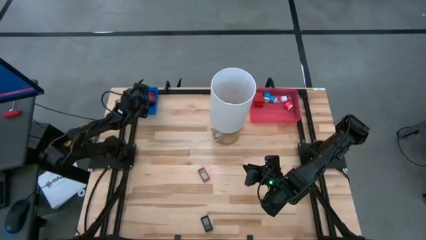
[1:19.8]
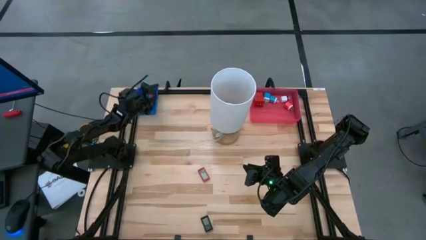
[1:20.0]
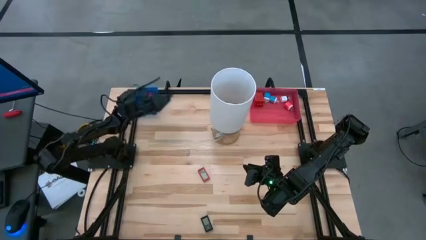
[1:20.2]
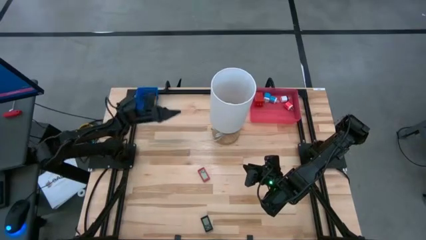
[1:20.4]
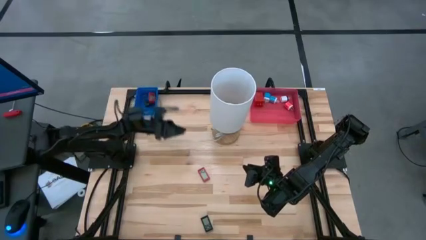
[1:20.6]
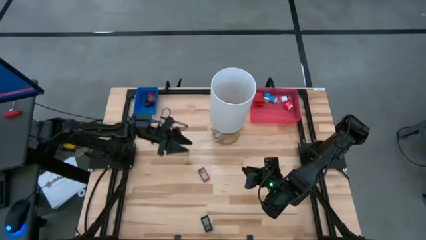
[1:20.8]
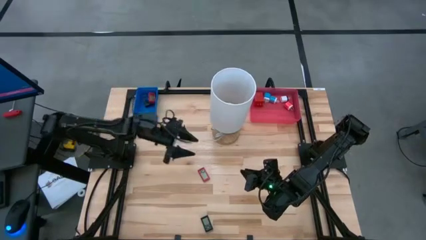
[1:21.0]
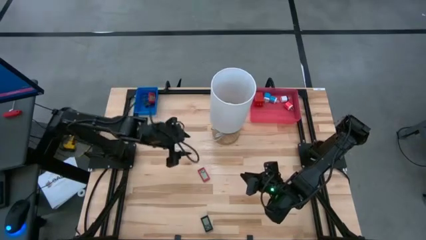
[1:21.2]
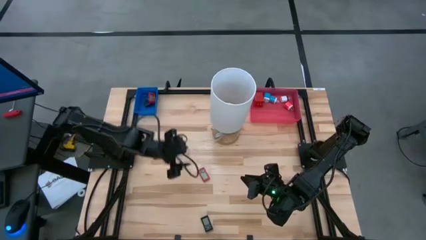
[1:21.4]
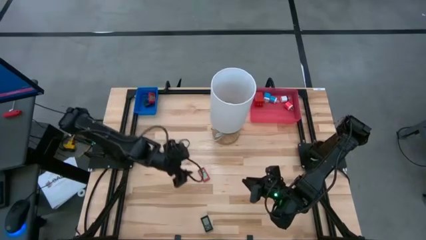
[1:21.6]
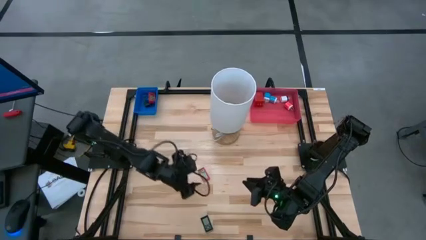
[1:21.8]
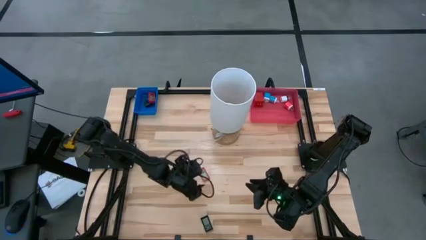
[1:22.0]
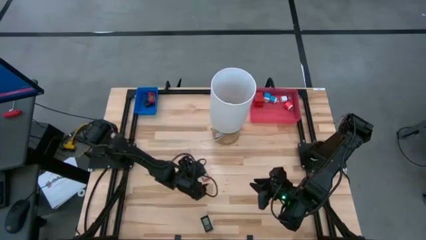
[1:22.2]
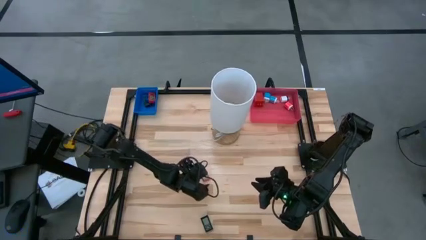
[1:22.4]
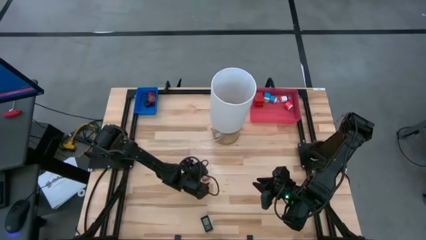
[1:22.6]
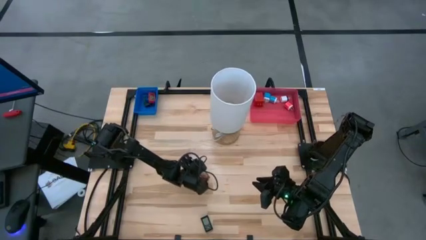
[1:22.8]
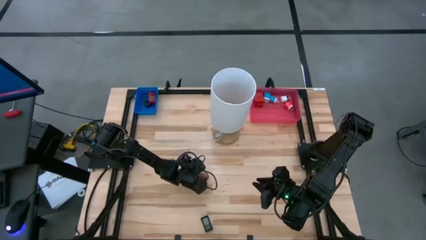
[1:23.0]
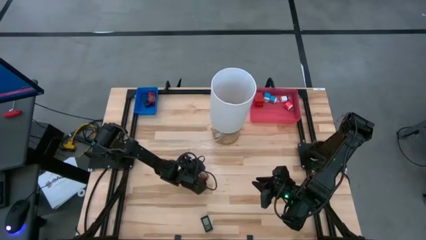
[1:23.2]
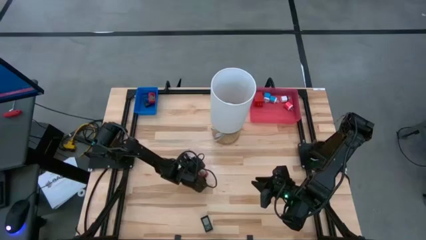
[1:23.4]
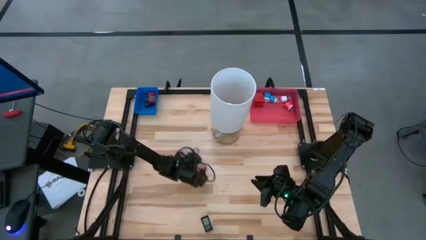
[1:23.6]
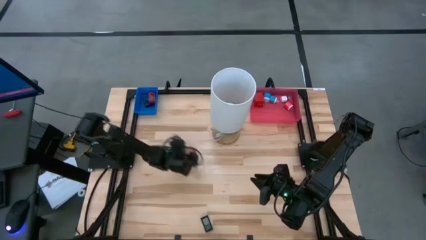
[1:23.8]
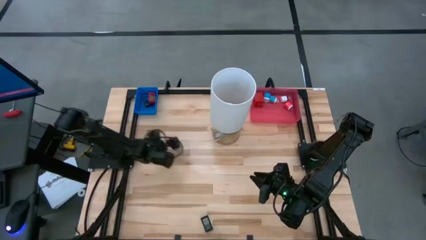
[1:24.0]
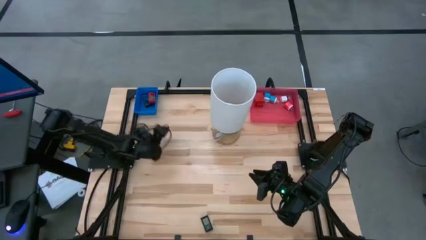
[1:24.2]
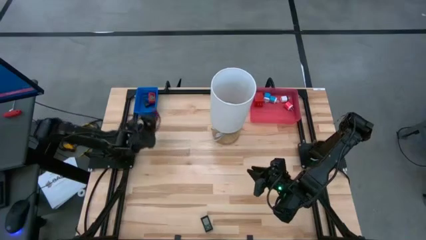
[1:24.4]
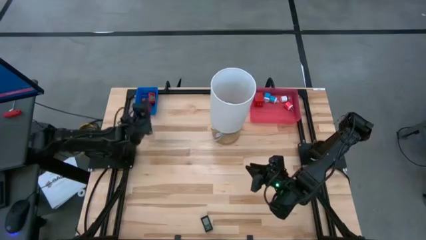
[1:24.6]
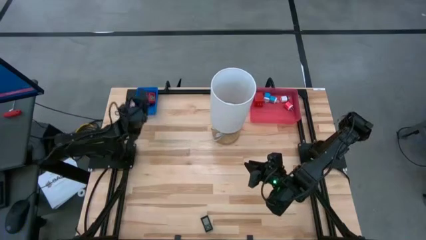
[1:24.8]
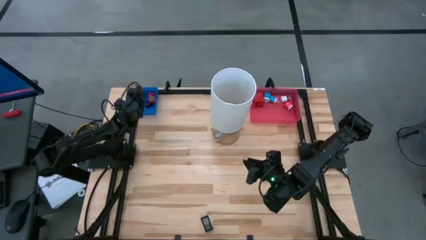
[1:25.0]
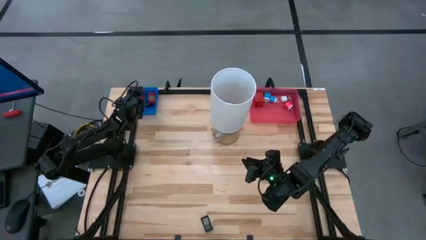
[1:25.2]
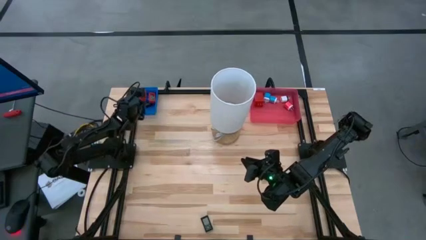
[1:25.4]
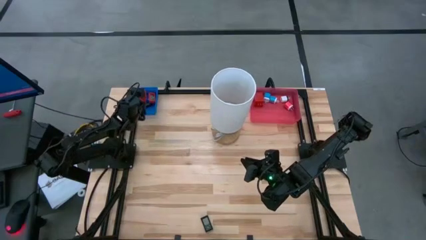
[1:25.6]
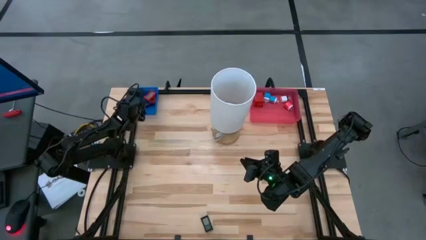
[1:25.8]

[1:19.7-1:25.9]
Task: Pick & Place Office items
Put the red digital timer into the blue bin

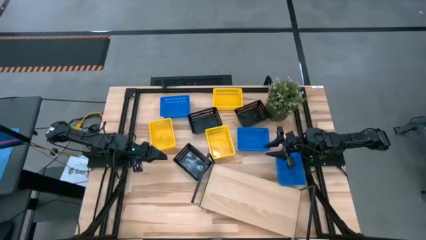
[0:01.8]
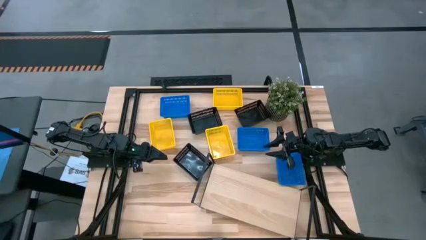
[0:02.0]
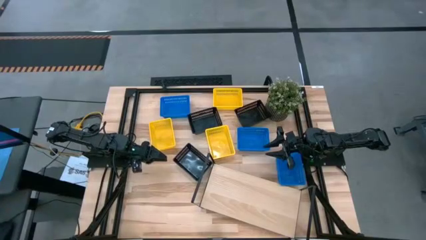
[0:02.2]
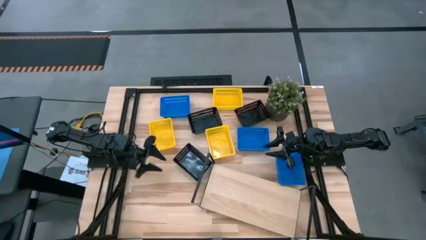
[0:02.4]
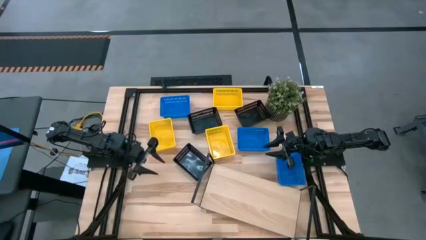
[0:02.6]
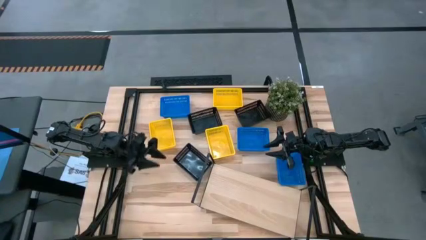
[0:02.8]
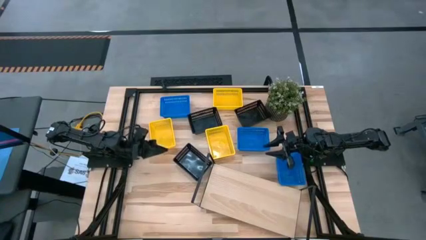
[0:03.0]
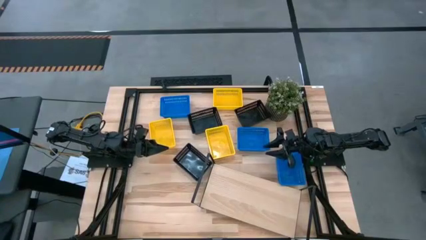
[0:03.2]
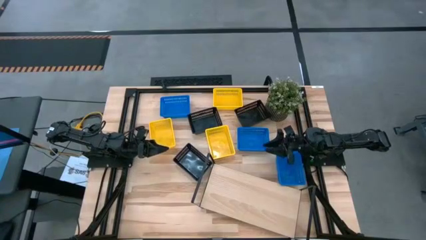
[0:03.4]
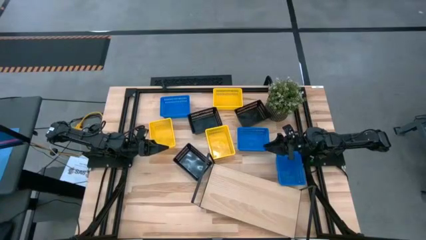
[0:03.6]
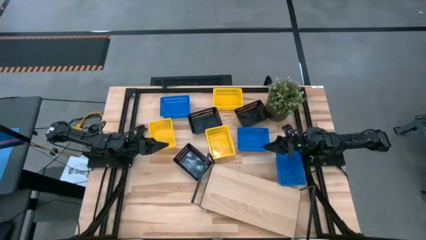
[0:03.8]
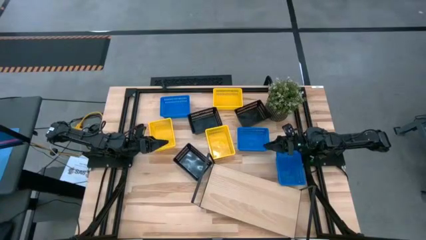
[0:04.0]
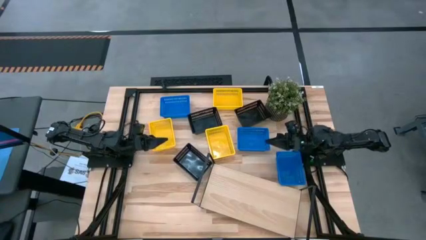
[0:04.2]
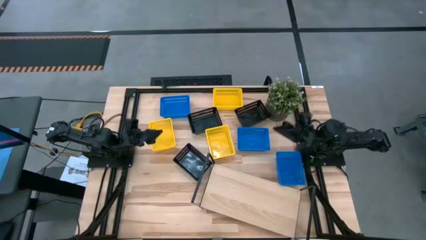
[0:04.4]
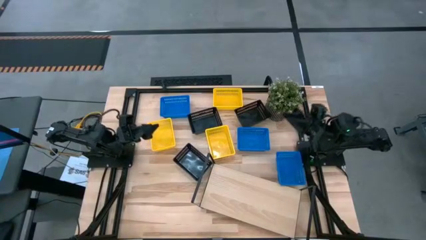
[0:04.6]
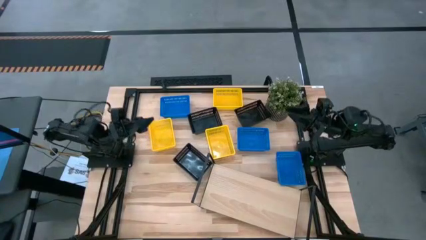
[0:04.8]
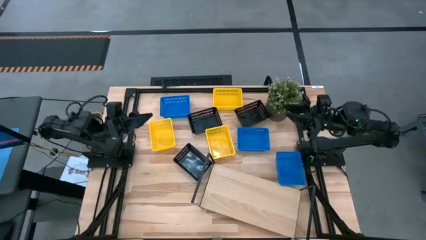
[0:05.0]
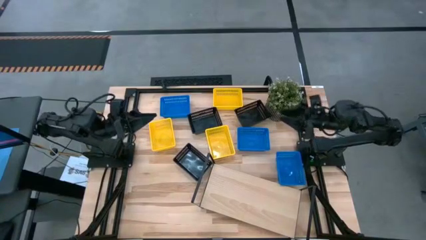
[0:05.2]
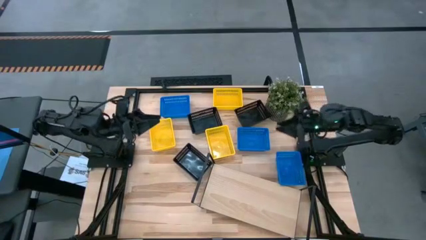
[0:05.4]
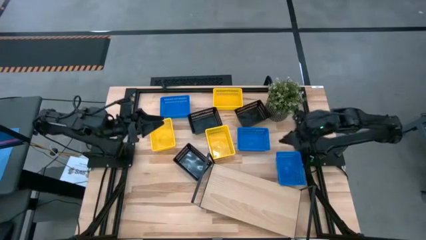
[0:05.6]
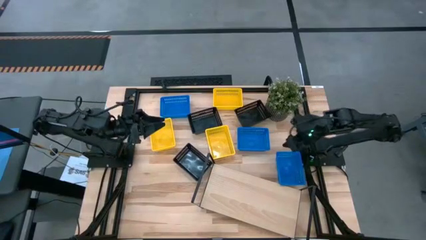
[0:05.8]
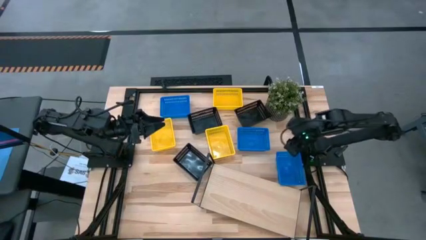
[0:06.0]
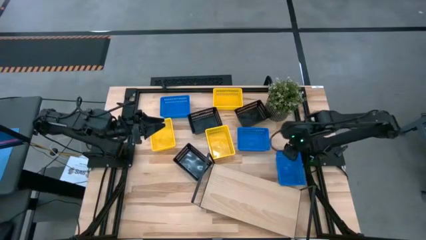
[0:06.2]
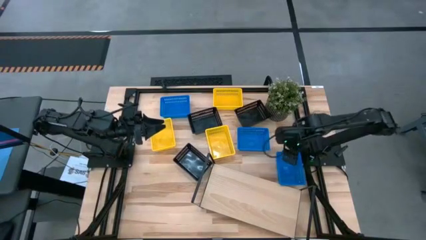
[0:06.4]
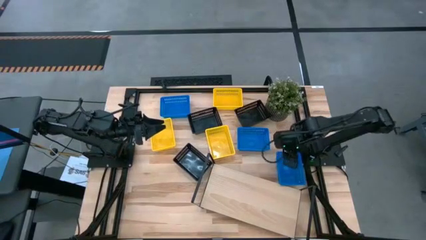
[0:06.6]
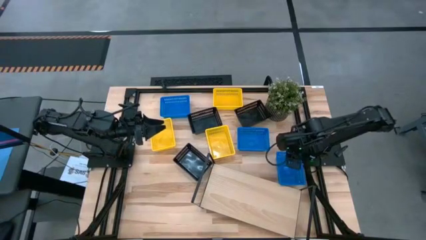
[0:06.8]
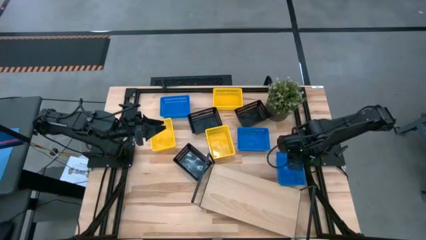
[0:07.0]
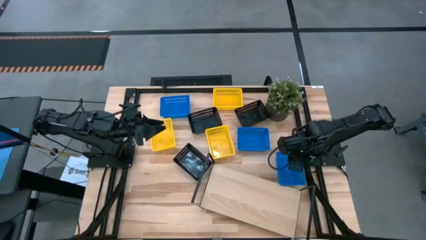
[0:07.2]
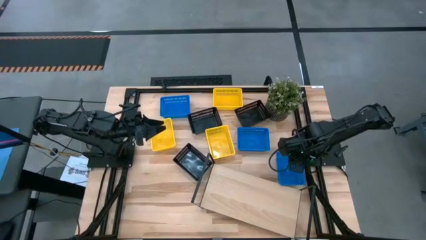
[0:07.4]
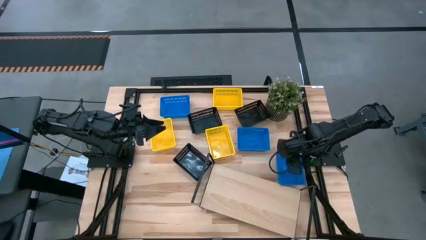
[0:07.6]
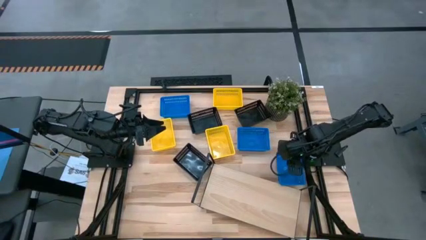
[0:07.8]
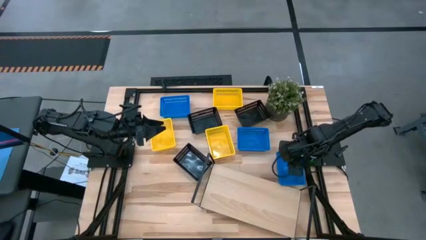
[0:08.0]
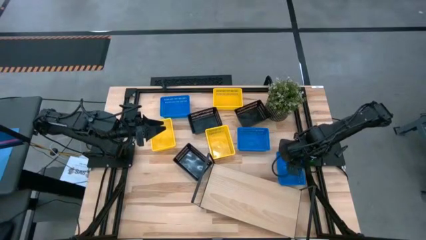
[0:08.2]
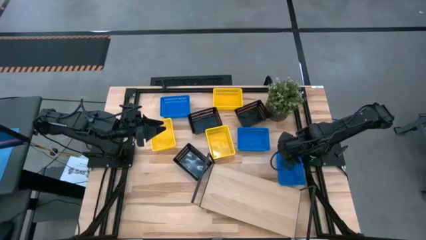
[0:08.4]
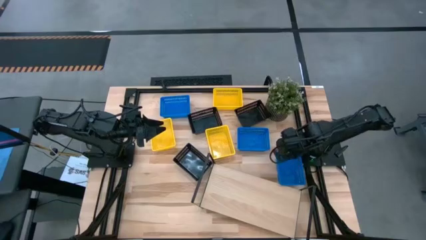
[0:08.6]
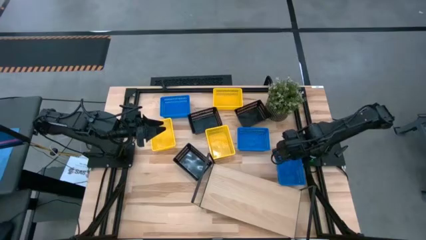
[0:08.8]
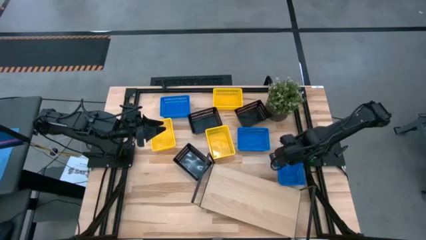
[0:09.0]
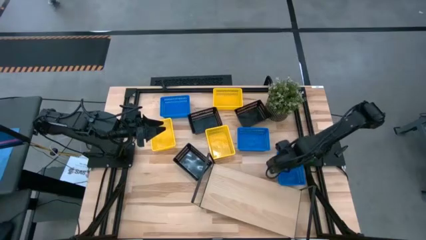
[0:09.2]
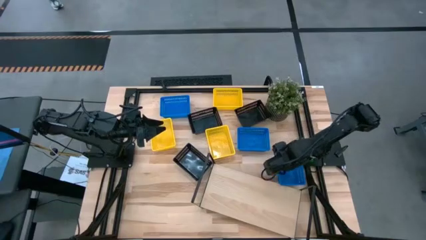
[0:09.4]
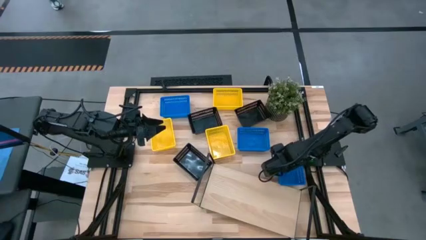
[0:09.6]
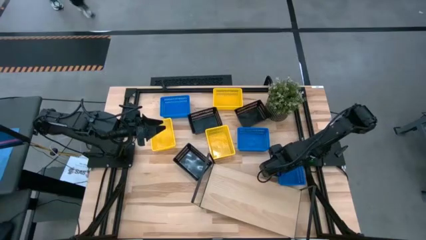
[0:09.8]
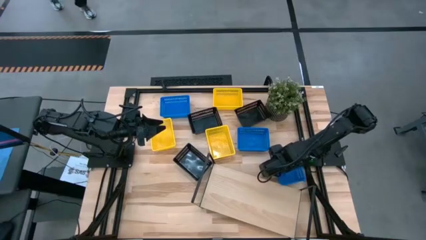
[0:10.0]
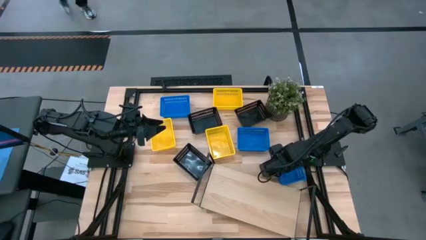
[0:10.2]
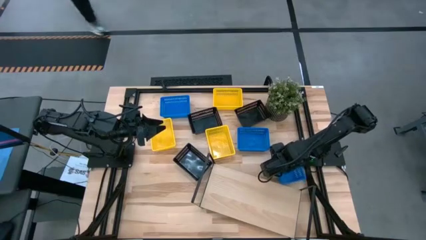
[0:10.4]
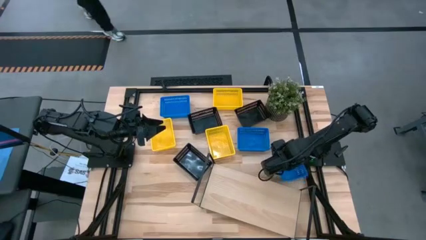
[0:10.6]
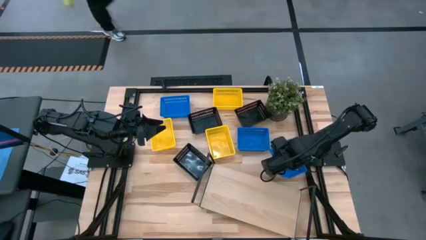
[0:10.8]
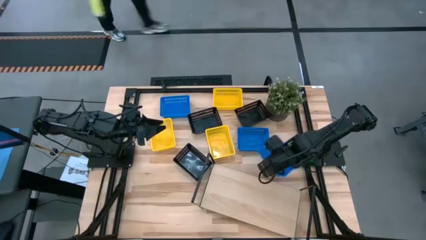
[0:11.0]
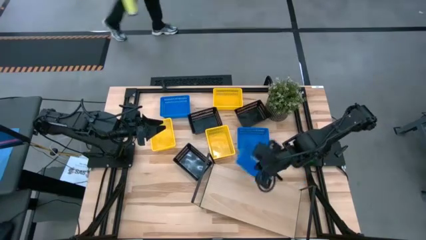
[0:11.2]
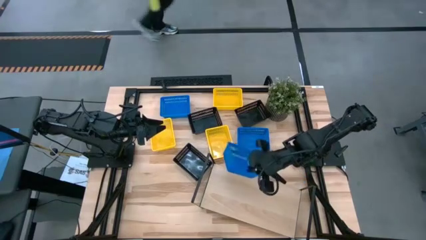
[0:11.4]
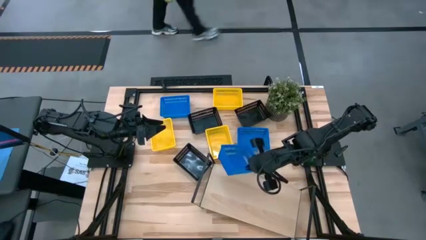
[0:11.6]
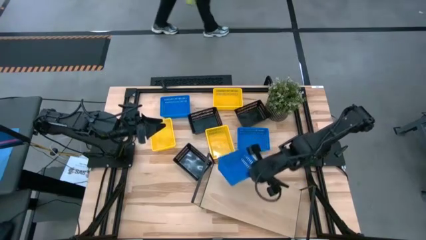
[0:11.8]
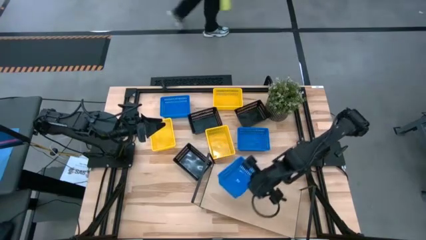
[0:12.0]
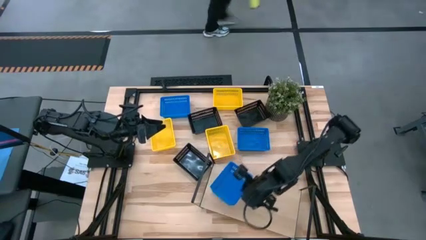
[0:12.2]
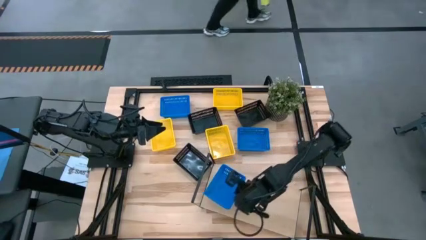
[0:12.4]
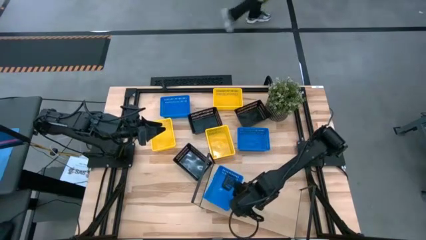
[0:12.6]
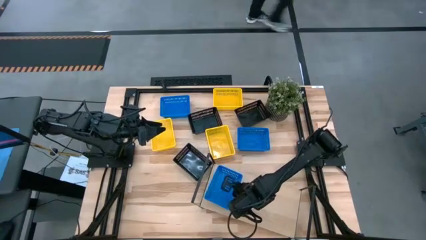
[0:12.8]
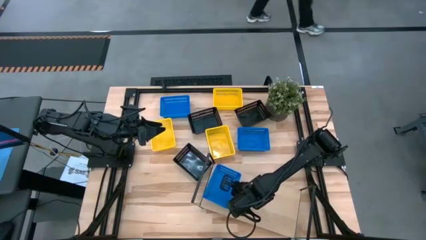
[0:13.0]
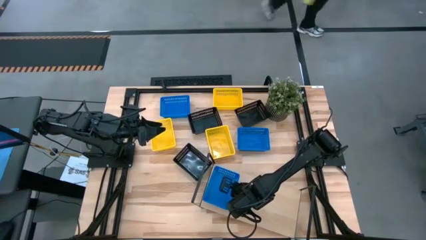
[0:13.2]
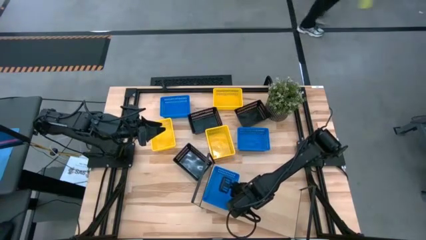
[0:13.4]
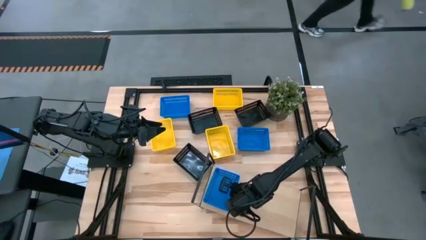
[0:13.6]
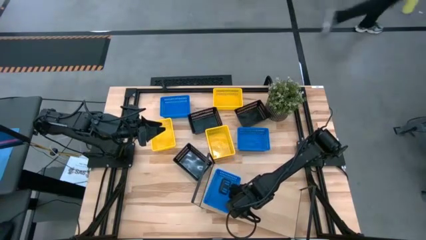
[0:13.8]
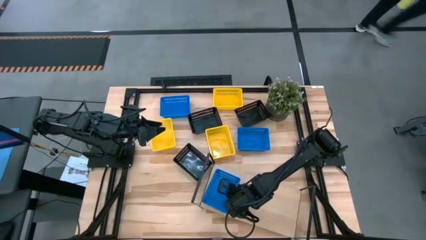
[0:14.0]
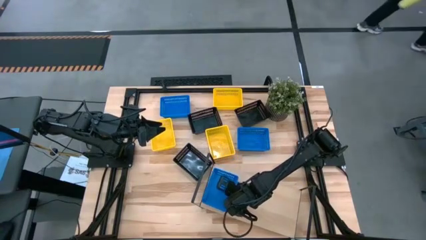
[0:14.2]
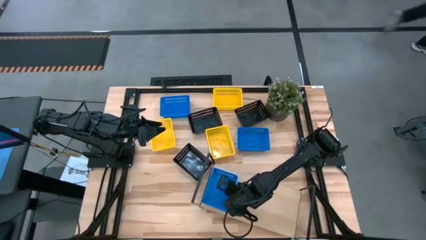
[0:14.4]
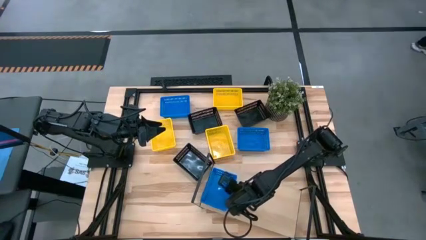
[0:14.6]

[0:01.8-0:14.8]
Task: Stack baskets on shelf by color
Put the right blue bin on the shelf
